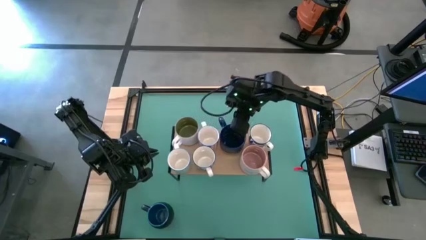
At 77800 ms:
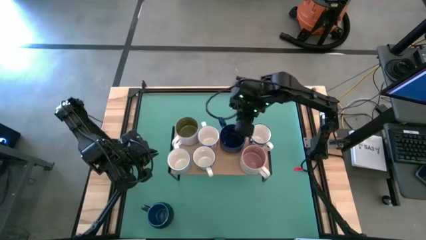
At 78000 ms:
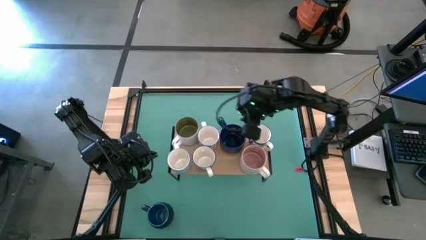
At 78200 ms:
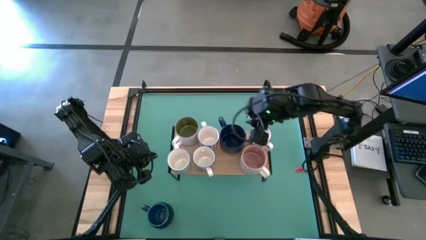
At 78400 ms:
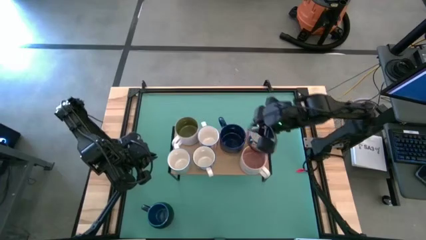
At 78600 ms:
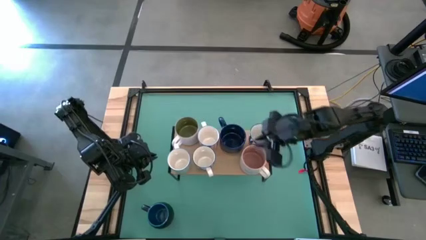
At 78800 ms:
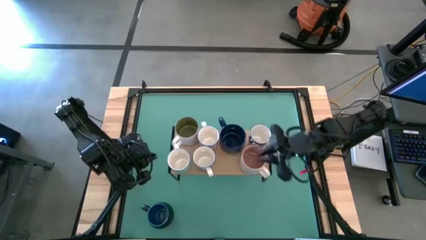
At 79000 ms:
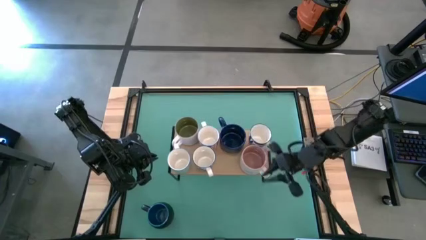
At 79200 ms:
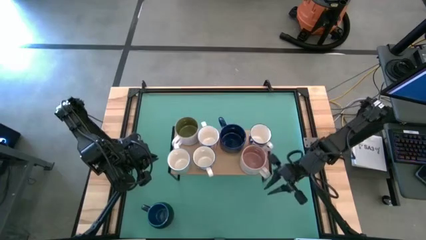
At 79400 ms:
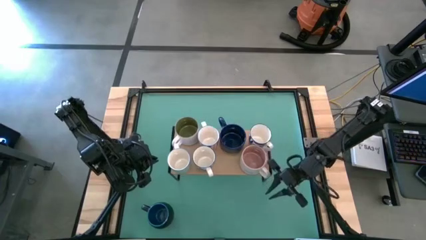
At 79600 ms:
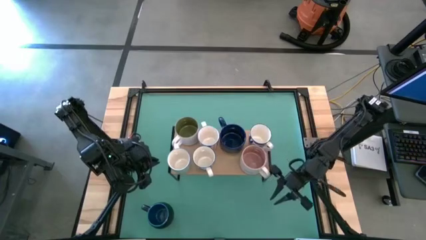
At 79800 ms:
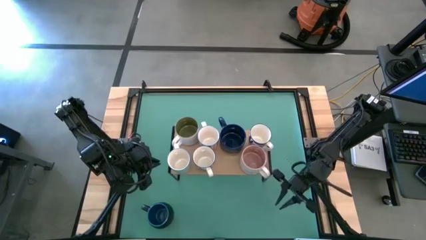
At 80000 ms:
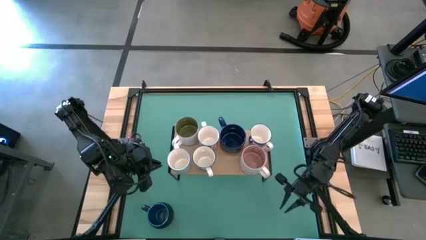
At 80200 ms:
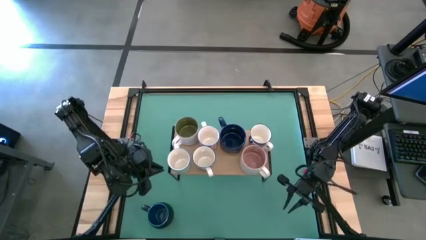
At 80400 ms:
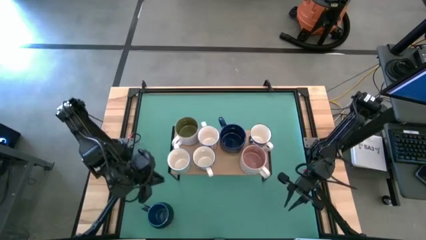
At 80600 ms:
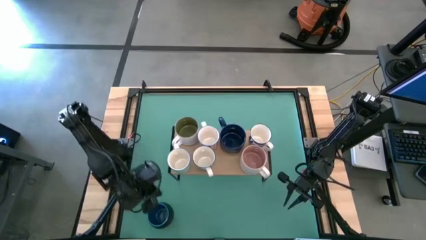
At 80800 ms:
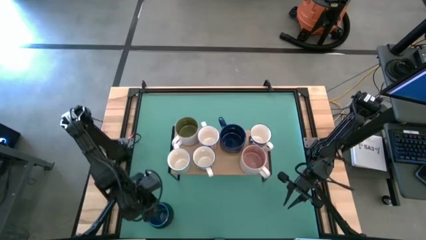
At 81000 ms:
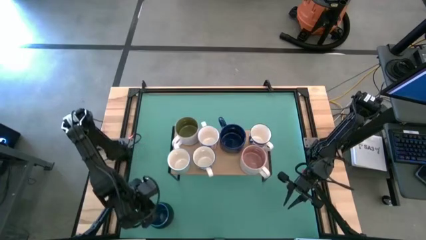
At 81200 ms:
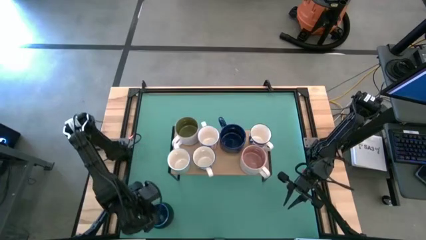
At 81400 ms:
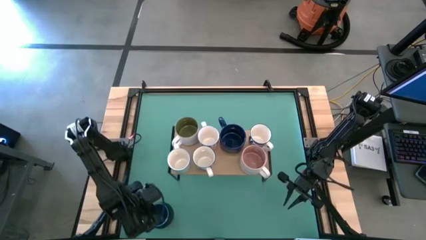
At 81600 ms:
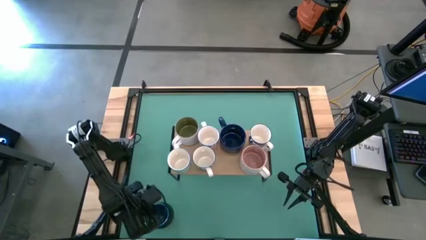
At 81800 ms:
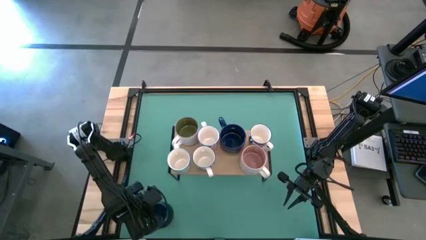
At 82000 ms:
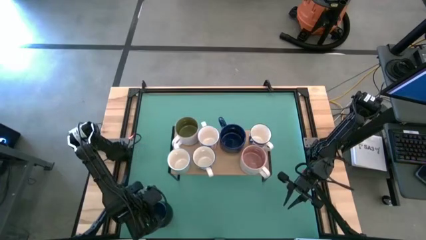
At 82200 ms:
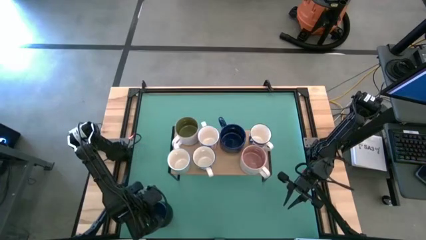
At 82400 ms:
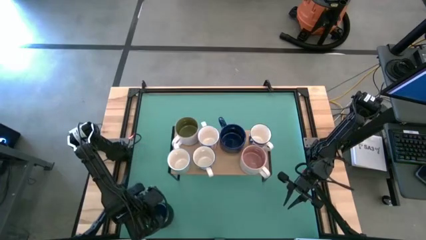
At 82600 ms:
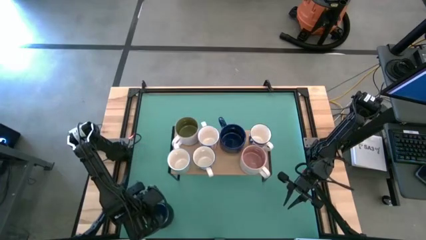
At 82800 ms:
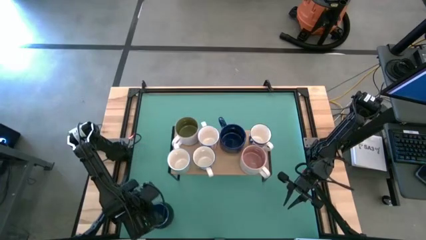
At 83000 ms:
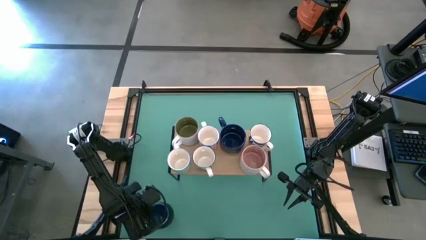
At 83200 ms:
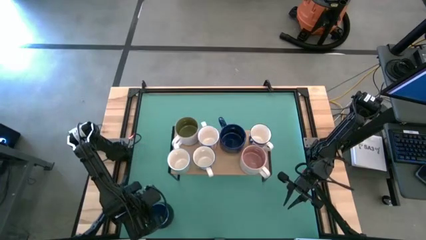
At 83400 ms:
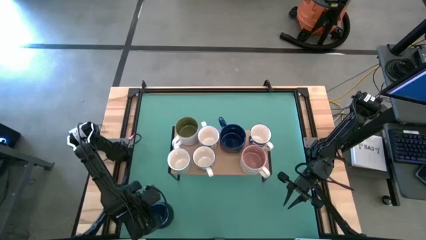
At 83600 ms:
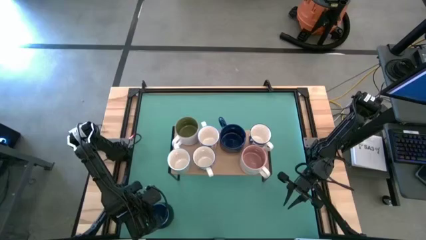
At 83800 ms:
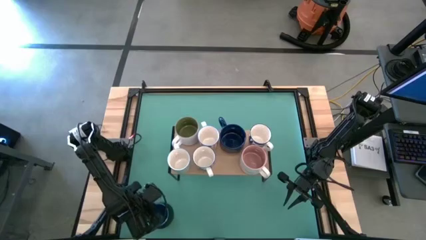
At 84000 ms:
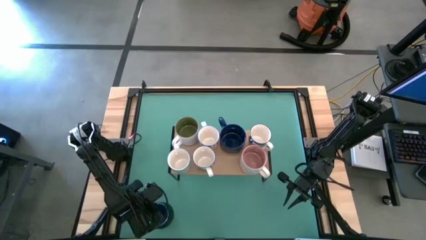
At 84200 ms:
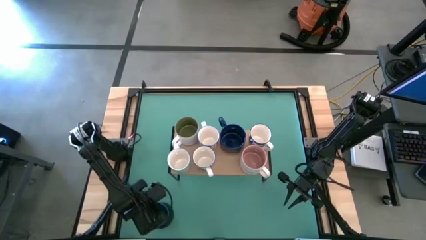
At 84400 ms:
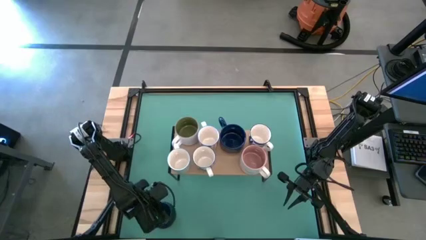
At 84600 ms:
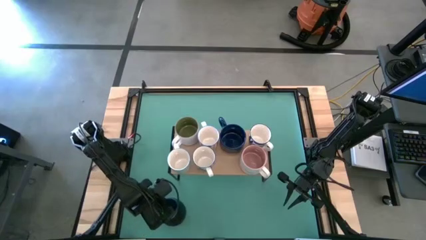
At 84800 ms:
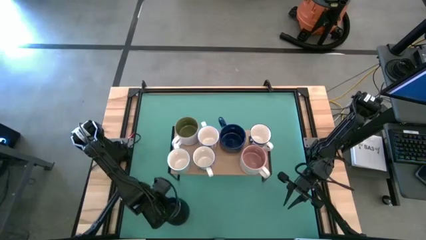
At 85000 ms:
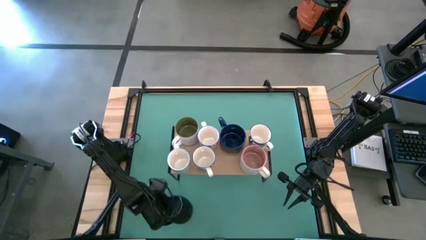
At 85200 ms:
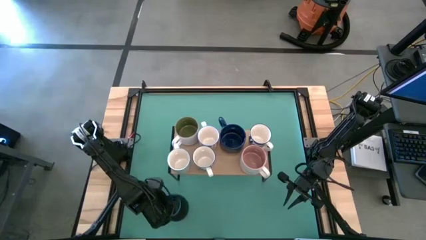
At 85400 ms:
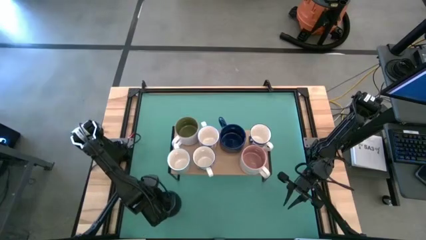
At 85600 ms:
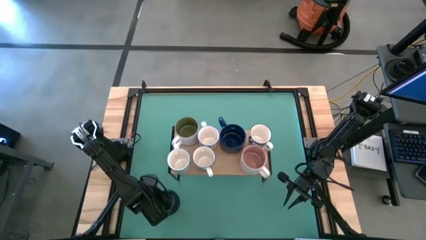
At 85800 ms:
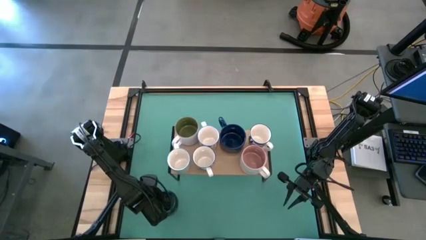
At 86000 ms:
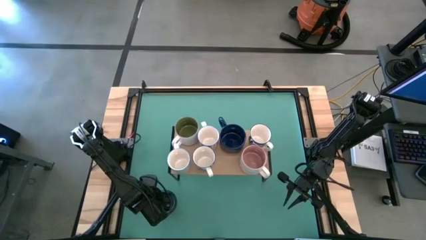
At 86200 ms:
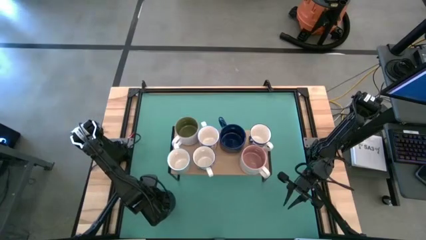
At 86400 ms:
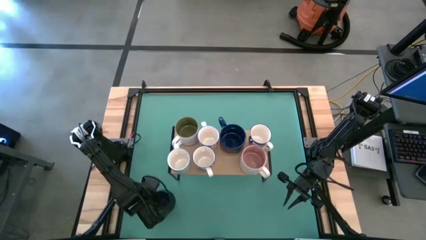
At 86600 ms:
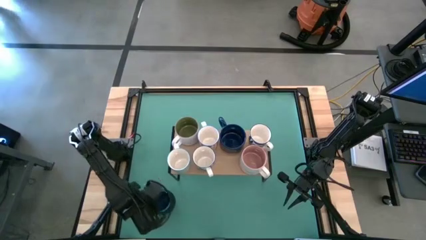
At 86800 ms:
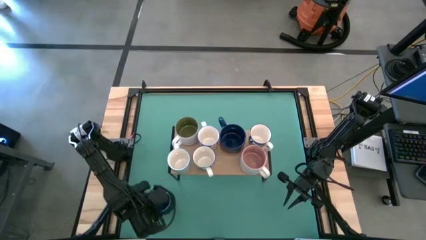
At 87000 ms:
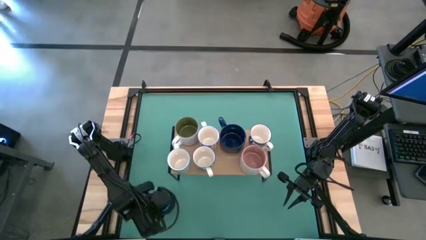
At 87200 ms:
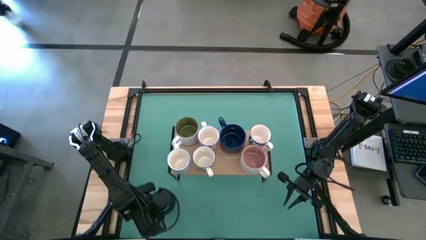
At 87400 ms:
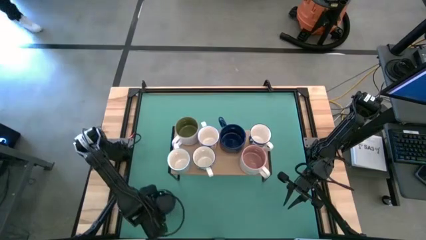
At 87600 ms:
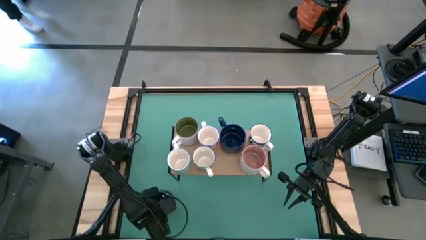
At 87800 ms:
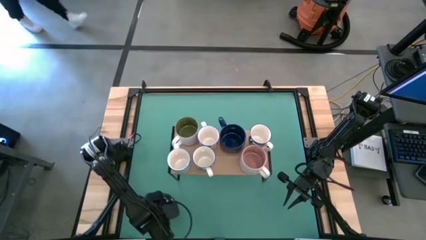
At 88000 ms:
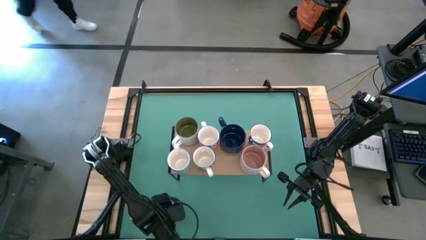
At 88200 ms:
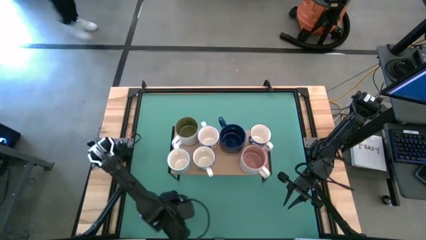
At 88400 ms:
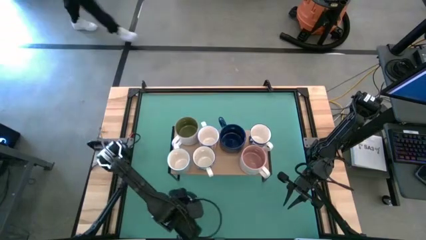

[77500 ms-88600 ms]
Task: Place coffee mugs
Put the blue mug on the shelf
